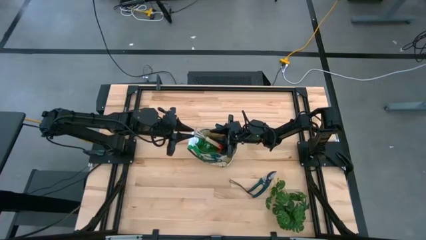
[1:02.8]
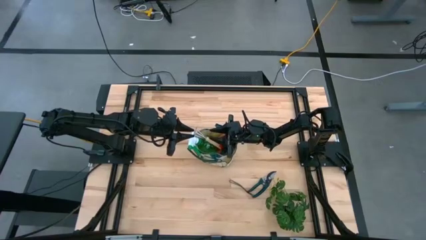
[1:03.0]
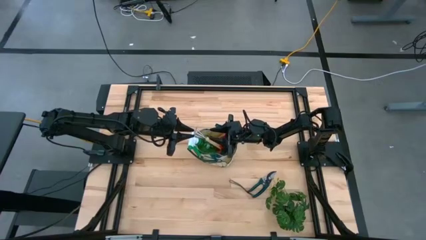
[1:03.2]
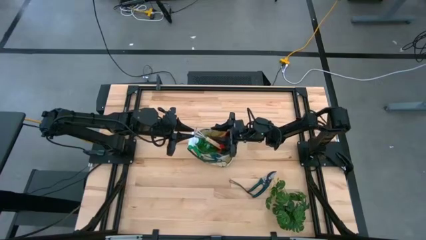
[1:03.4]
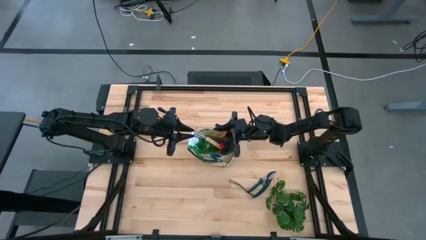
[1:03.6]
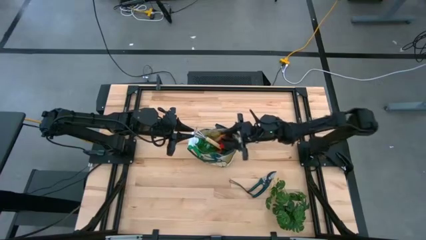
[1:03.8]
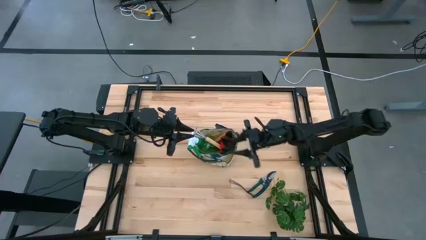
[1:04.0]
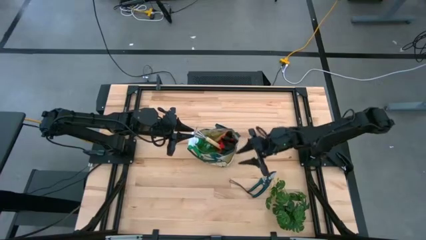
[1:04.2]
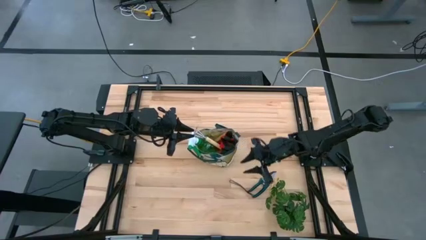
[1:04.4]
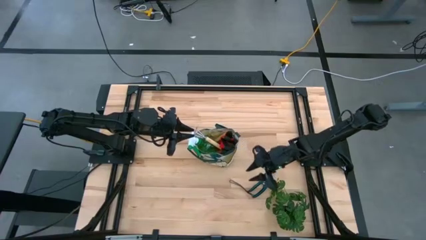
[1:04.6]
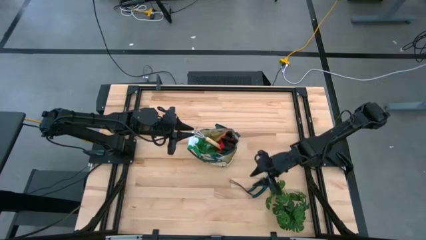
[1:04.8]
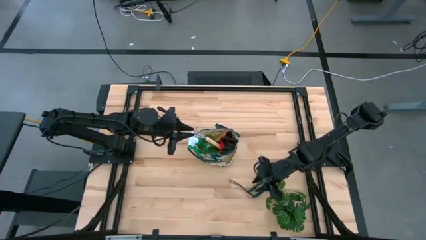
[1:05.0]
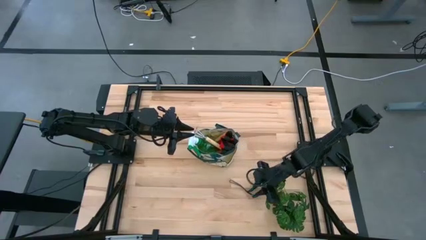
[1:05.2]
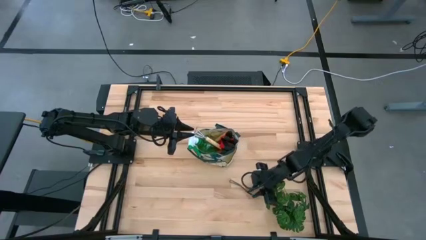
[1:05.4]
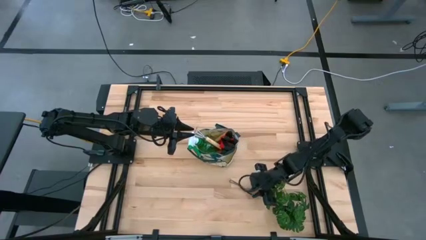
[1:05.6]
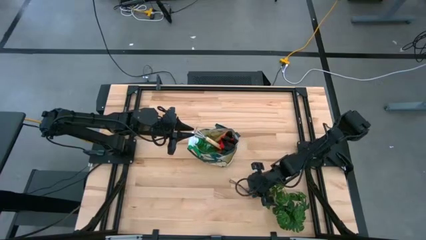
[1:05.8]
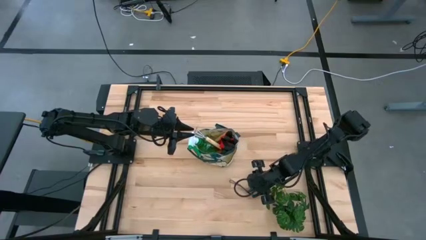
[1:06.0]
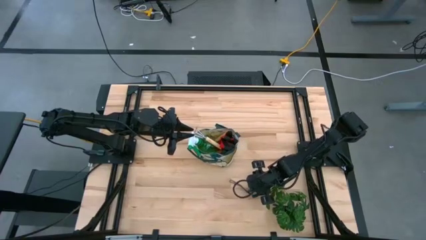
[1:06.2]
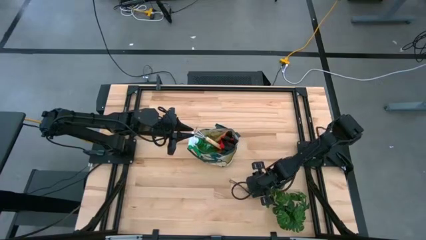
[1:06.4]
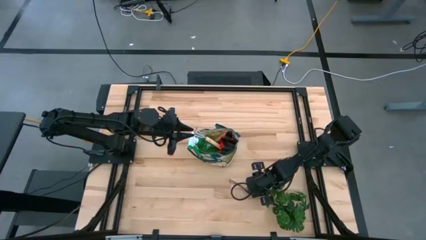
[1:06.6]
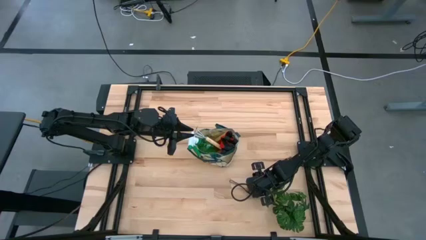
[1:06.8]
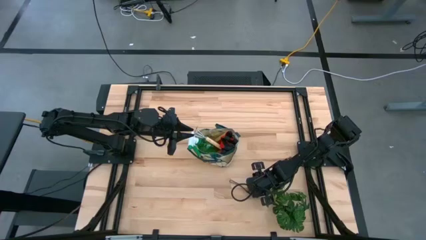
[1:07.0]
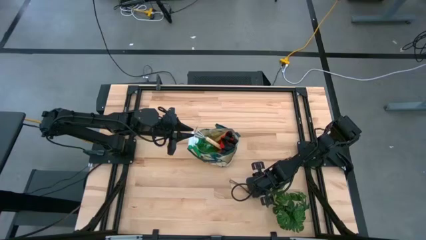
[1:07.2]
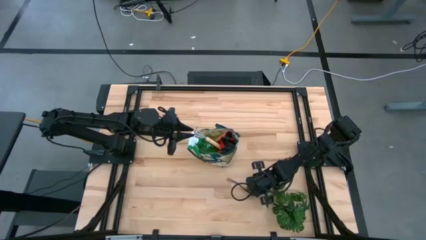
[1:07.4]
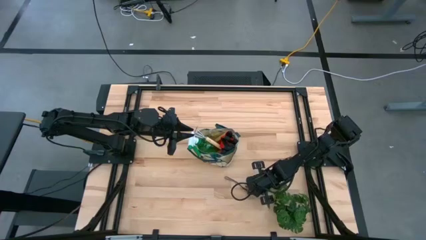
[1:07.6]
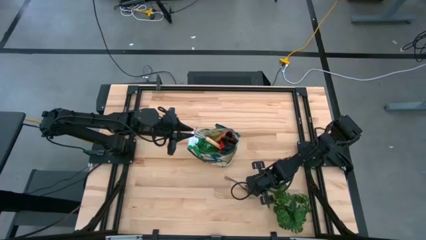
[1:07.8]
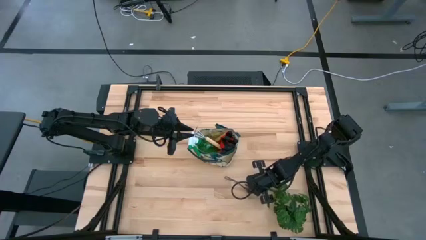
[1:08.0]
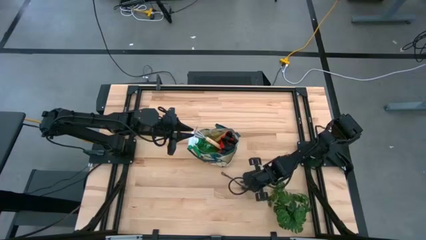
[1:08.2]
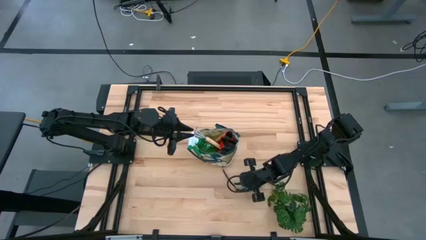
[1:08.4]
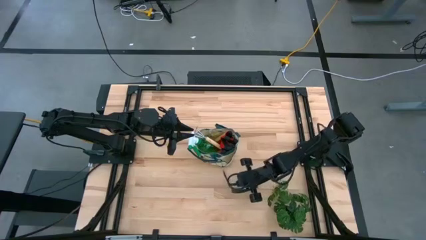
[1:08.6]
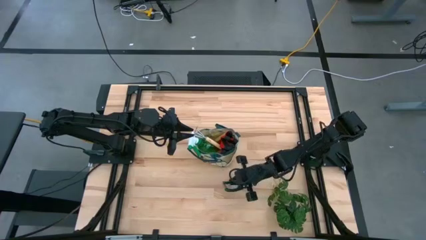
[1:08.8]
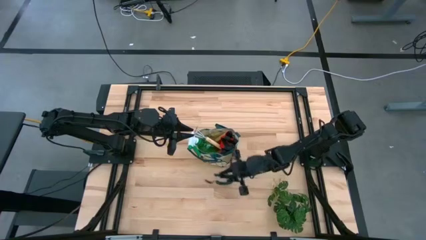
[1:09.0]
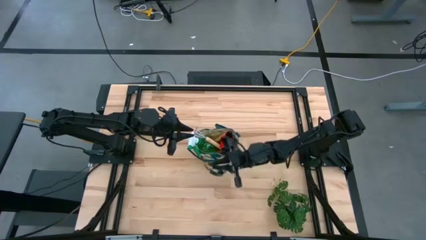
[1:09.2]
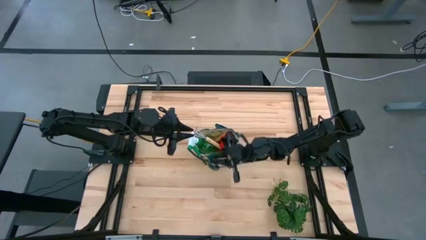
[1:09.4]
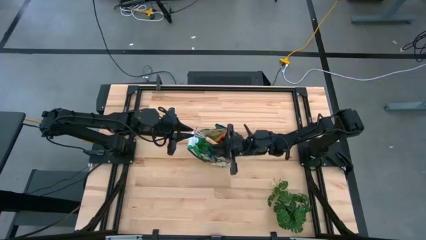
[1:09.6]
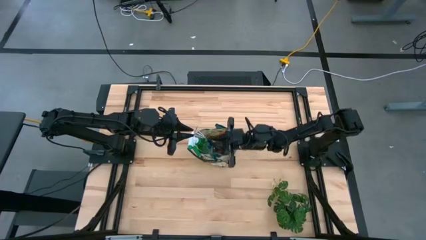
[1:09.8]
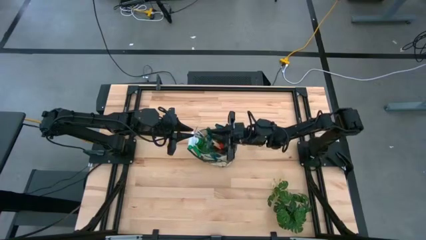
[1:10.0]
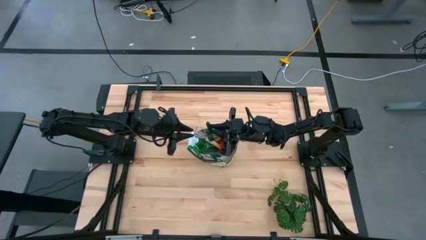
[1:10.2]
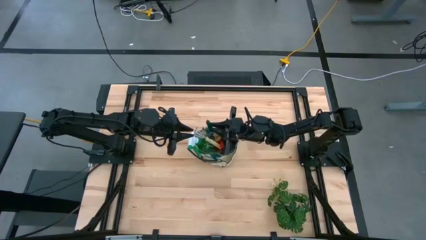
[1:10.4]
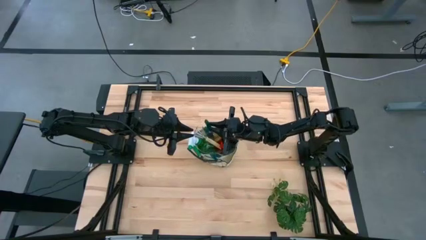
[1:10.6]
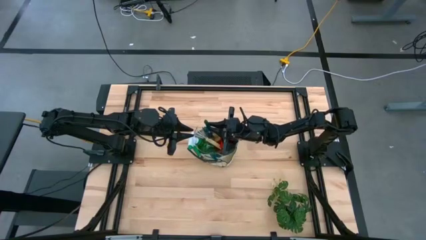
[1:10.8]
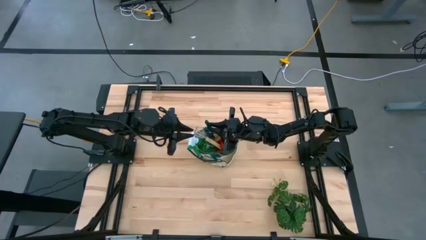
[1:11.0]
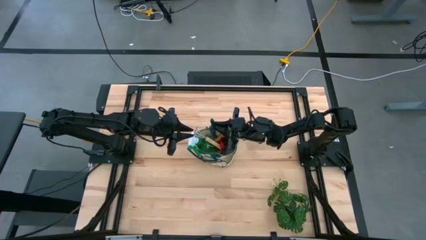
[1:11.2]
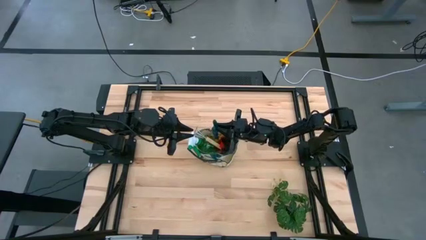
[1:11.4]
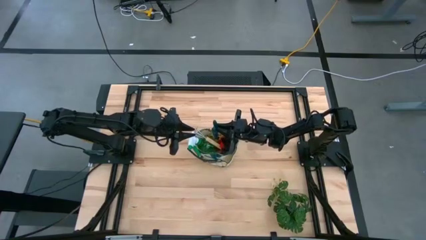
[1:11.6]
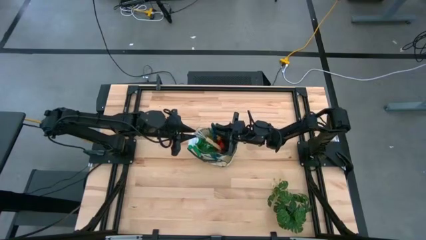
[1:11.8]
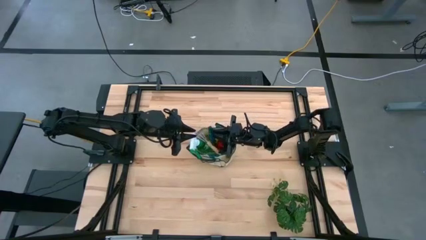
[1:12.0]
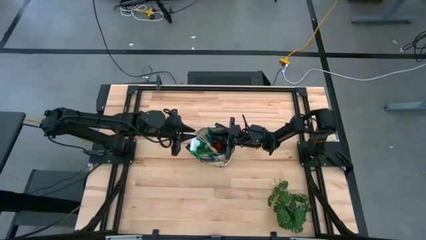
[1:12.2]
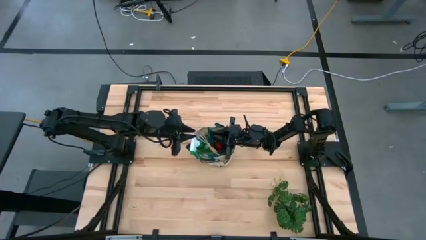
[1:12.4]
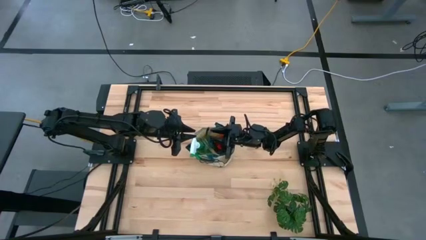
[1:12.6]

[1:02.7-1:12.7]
Task: Pick & Place Garden tools in Gardening bag
Put the green shear scissors into the green gardening bag

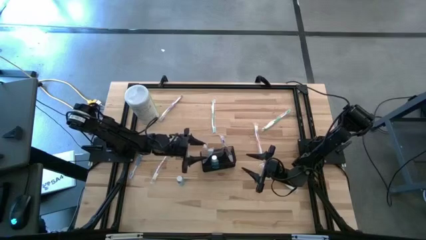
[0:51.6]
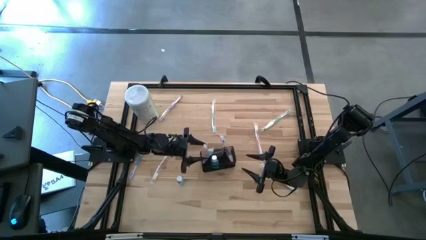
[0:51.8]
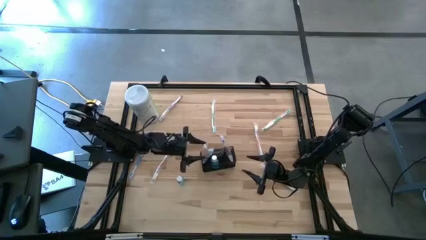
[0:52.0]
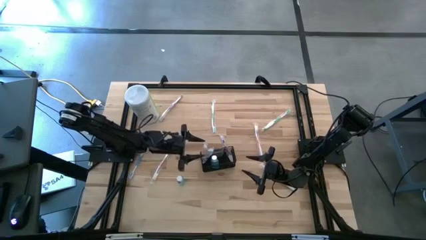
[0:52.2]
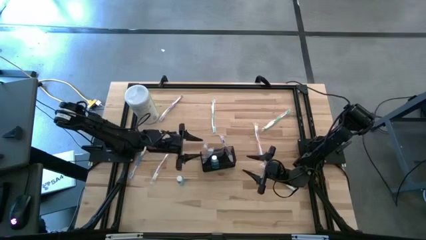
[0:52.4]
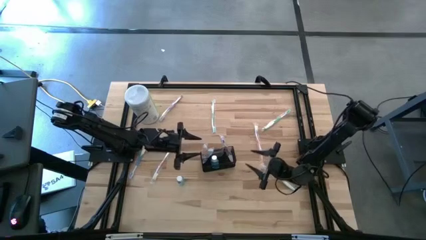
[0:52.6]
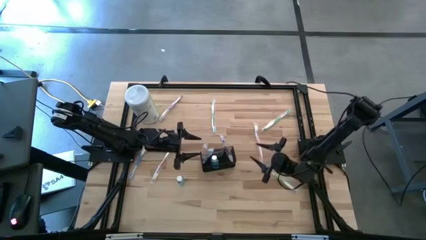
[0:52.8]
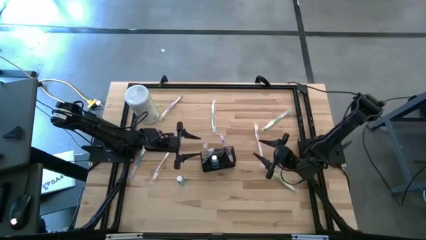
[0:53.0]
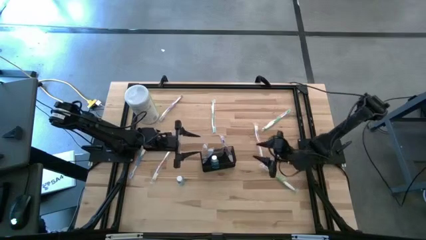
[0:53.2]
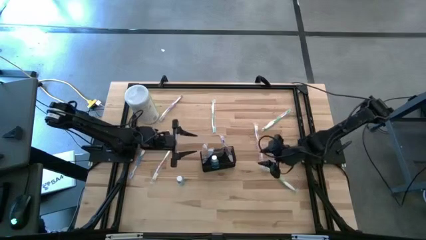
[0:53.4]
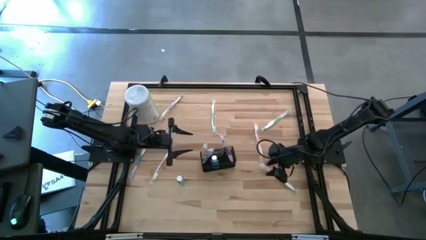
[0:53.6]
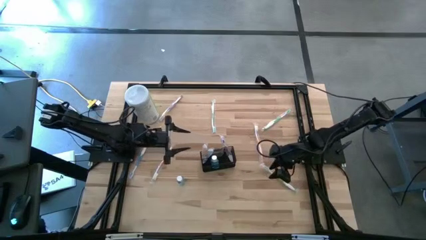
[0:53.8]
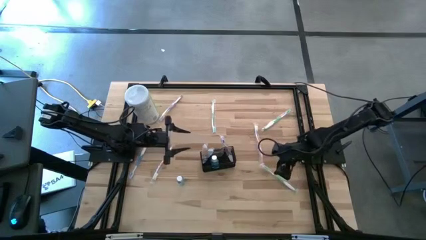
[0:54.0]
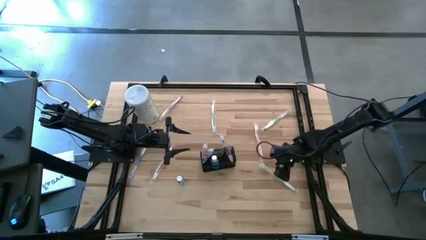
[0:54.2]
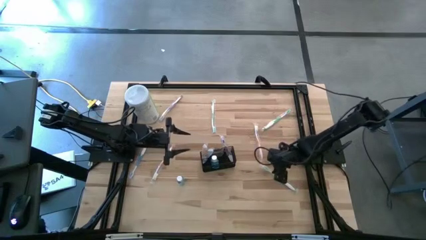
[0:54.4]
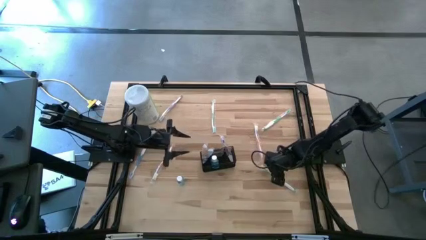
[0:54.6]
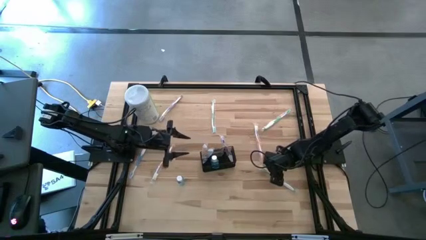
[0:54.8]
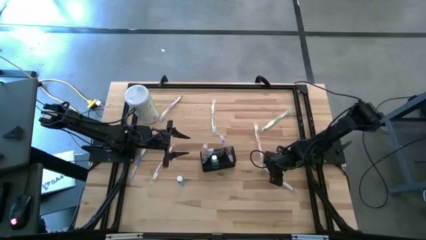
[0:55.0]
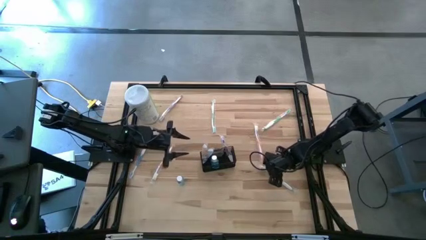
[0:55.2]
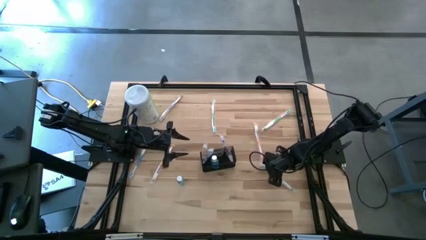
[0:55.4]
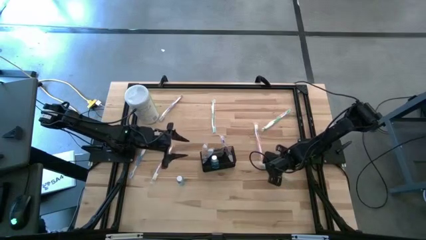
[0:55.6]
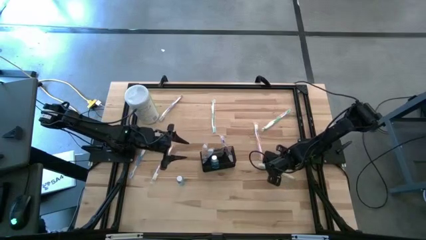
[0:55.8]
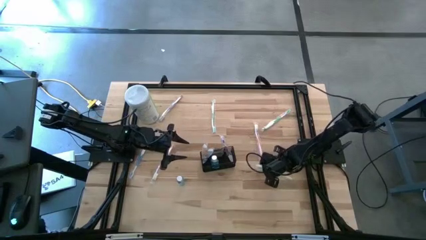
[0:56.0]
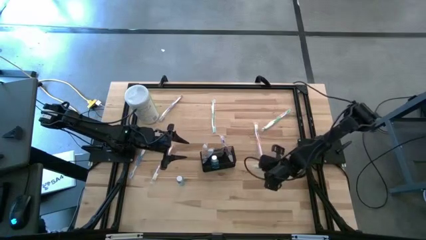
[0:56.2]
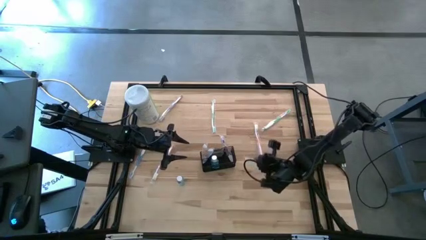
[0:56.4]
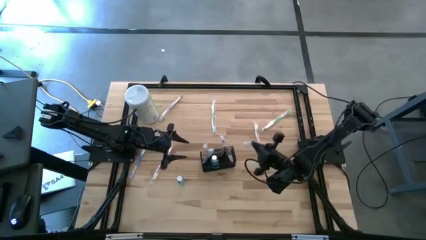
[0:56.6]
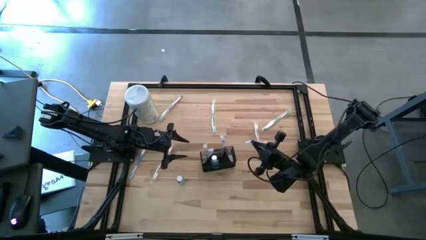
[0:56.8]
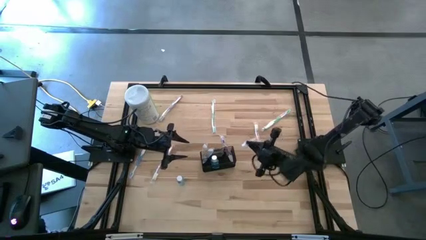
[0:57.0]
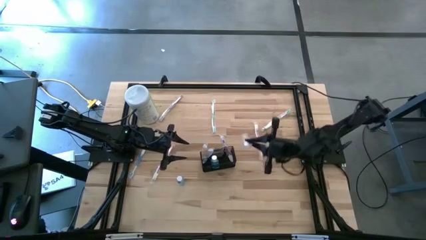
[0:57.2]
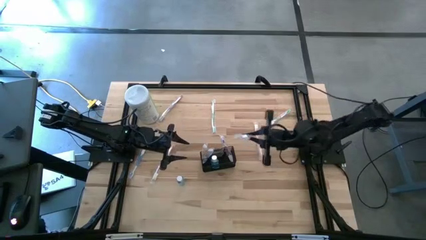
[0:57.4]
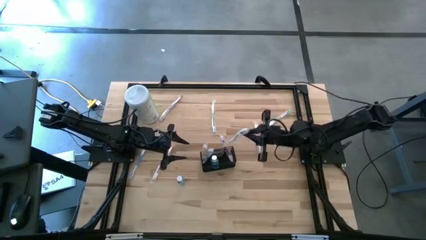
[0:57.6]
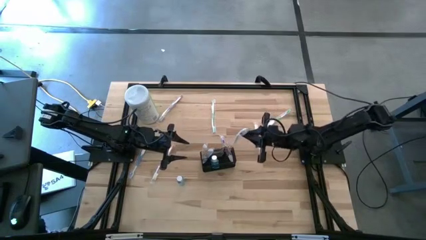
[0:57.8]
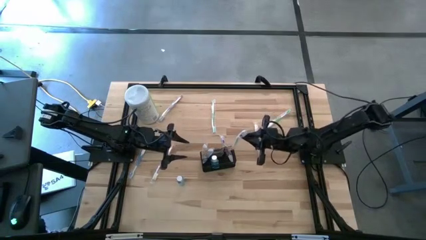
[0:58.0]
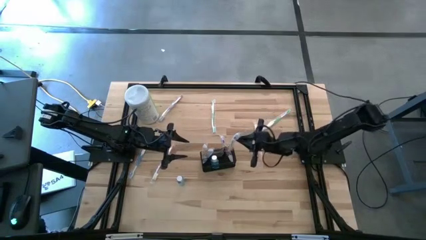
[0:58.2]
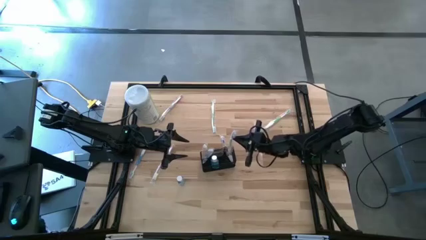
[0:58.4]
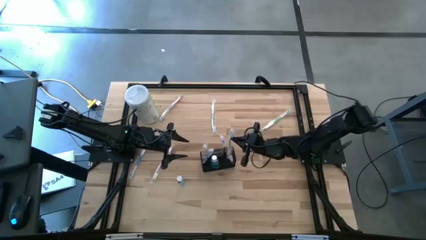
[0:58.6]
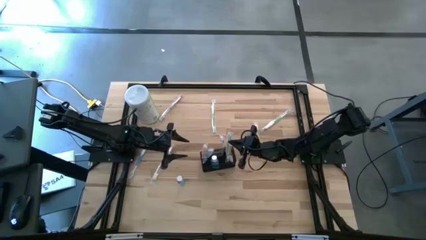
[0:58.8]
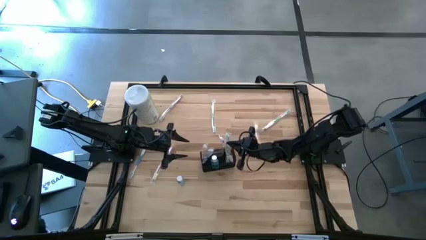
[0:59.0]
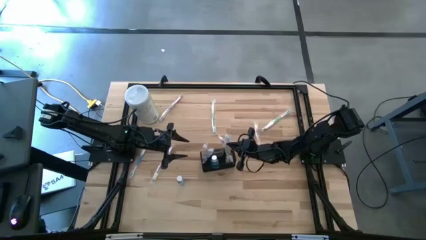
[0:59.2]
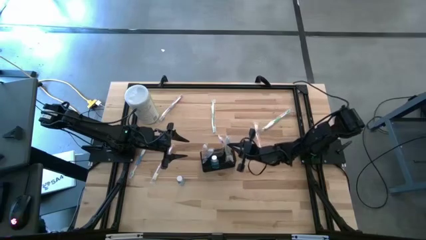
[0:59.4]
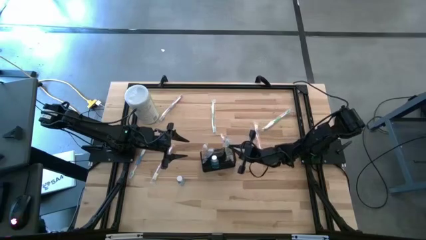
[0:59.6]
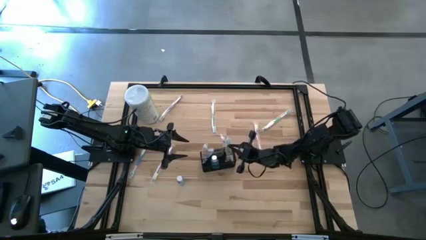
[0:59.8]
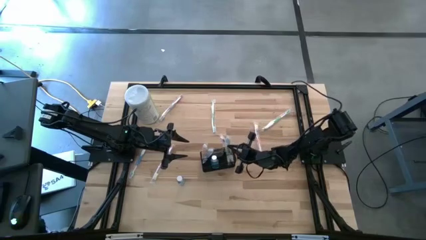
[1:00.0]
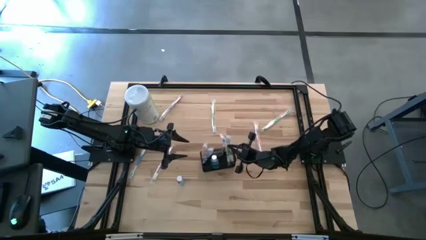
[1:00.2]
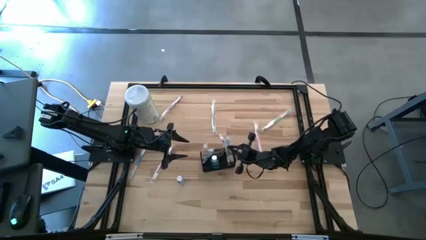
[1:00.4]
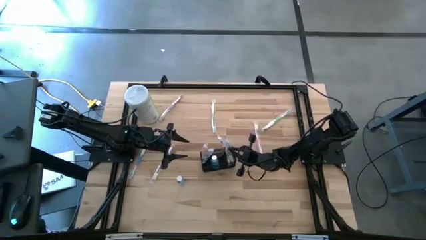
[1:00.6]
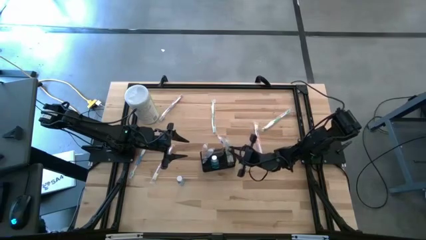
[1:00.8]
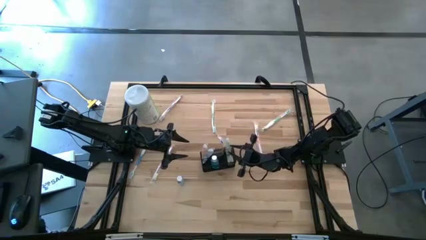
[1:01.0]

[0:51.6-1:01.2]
Task: Pick & Place toothbrushing station
Put the bottom green toothbrush into the black wire organizer
